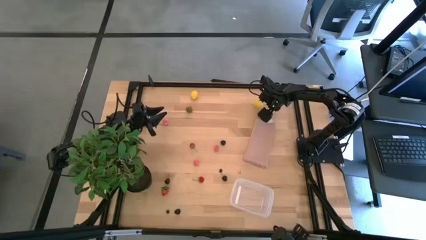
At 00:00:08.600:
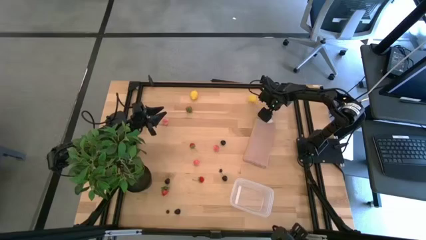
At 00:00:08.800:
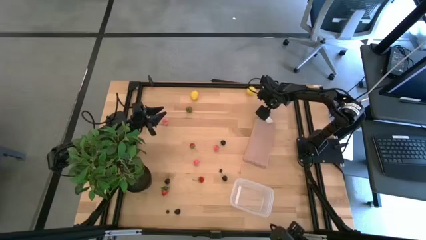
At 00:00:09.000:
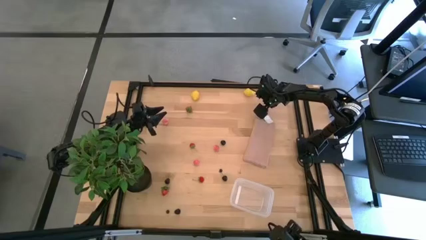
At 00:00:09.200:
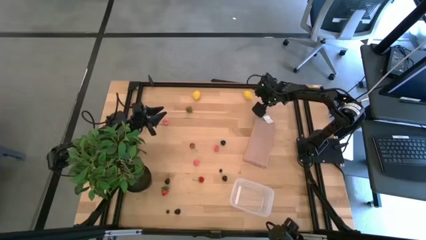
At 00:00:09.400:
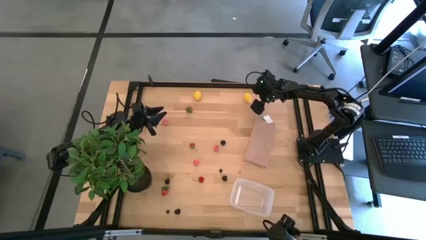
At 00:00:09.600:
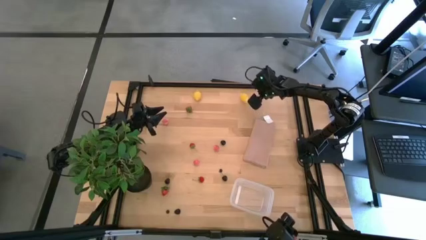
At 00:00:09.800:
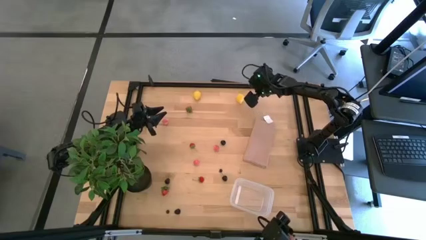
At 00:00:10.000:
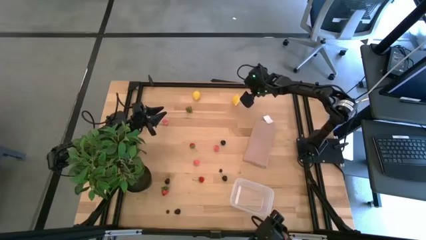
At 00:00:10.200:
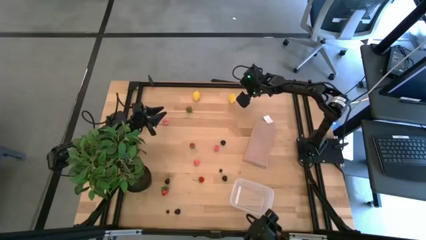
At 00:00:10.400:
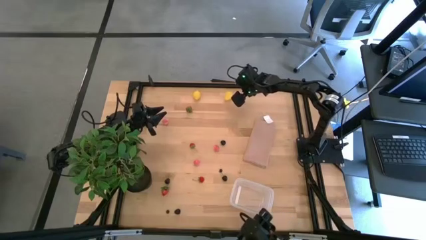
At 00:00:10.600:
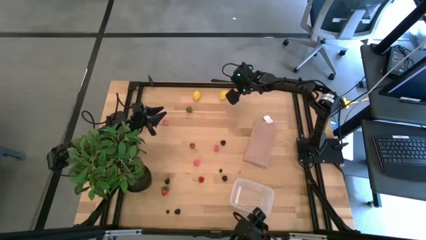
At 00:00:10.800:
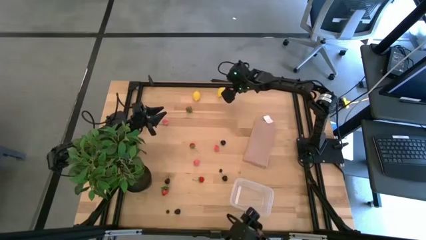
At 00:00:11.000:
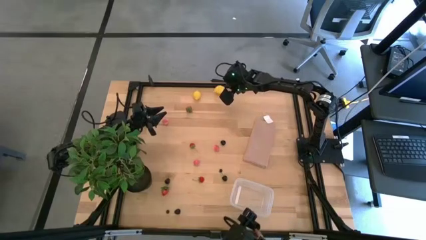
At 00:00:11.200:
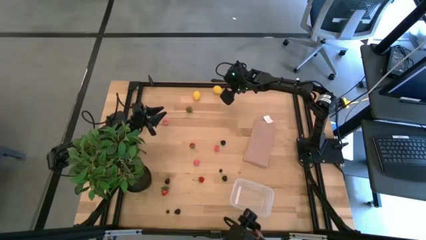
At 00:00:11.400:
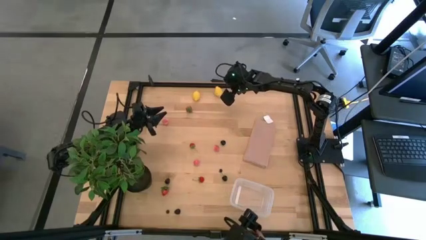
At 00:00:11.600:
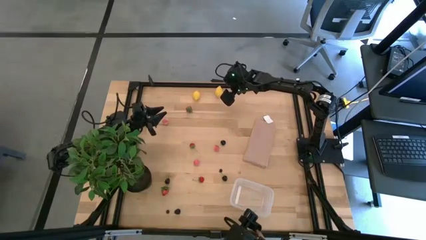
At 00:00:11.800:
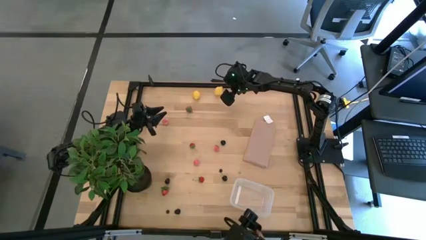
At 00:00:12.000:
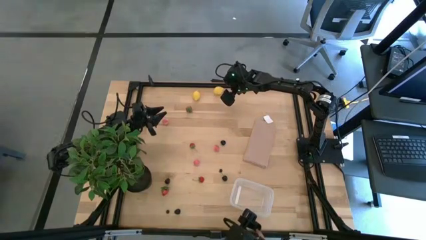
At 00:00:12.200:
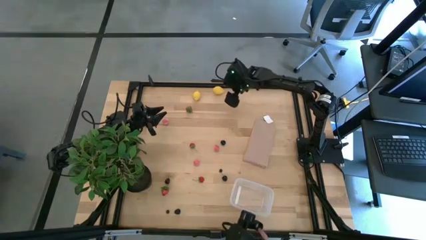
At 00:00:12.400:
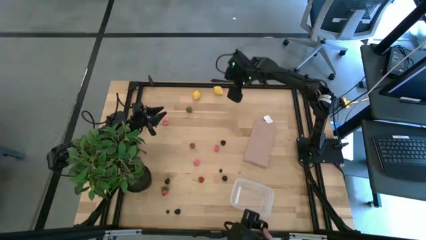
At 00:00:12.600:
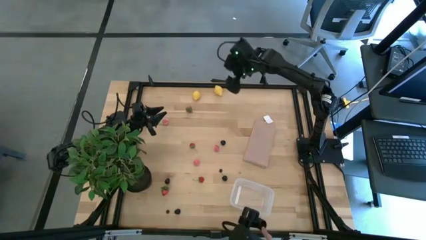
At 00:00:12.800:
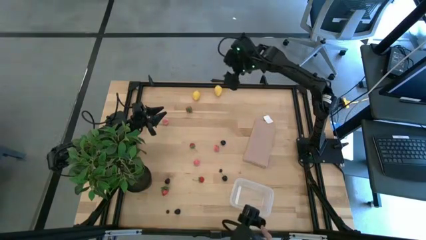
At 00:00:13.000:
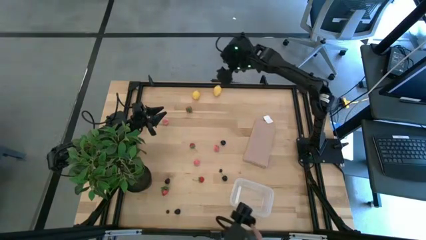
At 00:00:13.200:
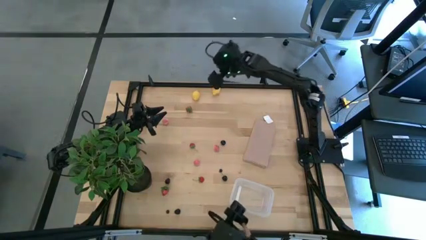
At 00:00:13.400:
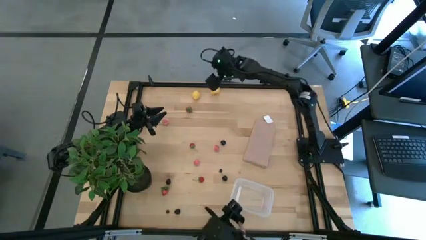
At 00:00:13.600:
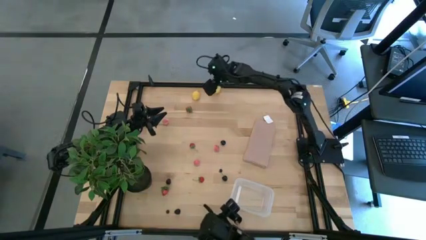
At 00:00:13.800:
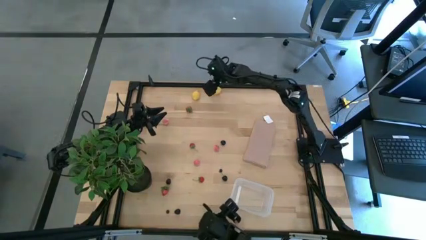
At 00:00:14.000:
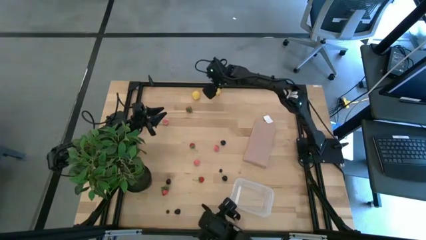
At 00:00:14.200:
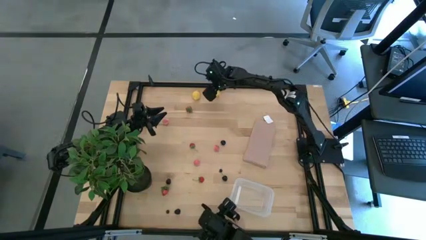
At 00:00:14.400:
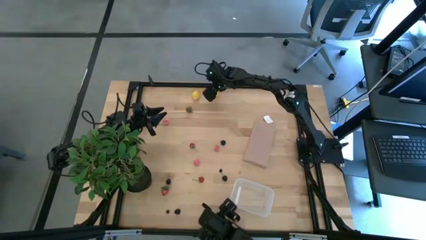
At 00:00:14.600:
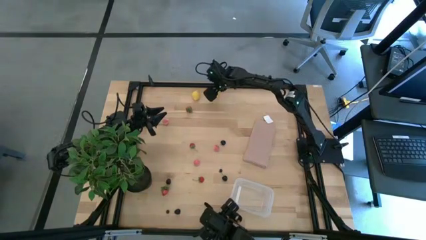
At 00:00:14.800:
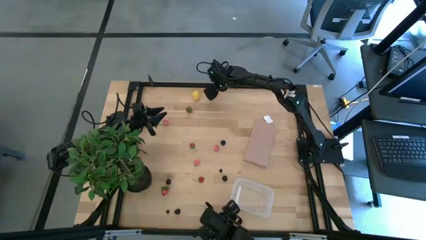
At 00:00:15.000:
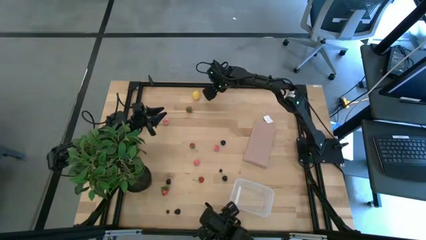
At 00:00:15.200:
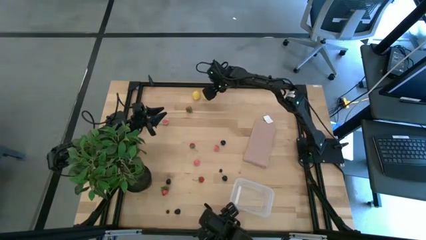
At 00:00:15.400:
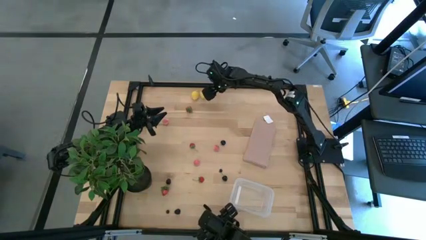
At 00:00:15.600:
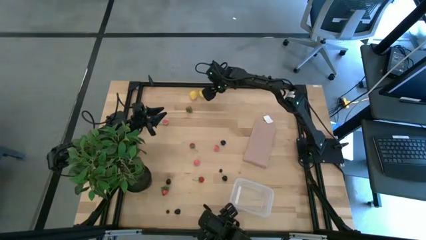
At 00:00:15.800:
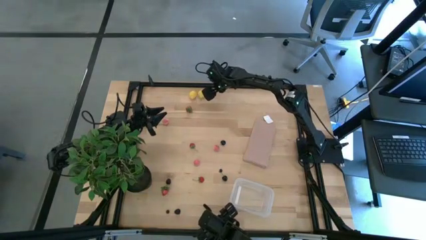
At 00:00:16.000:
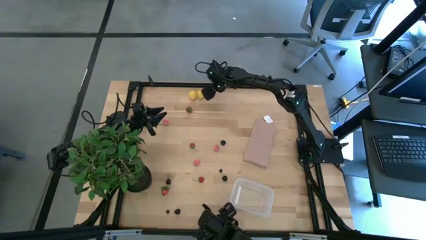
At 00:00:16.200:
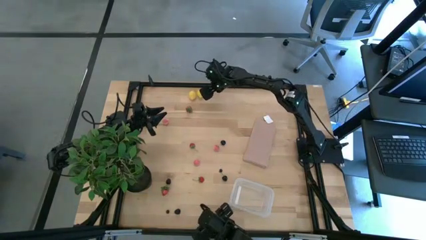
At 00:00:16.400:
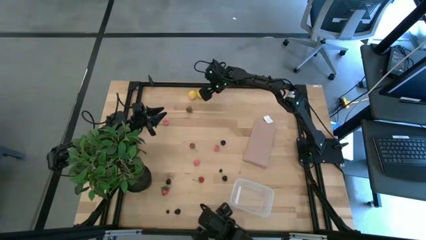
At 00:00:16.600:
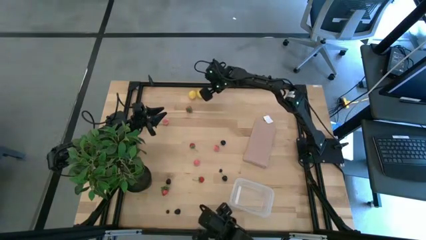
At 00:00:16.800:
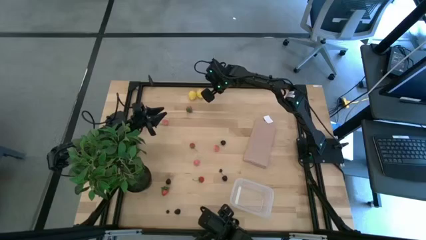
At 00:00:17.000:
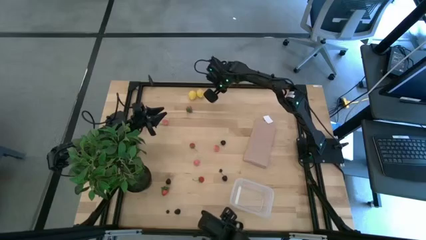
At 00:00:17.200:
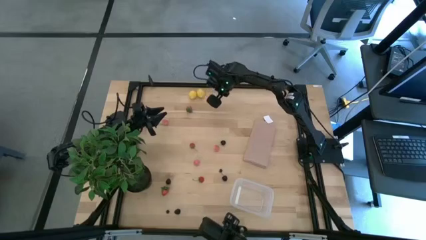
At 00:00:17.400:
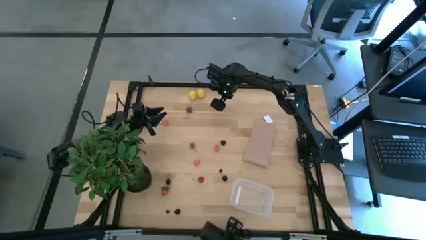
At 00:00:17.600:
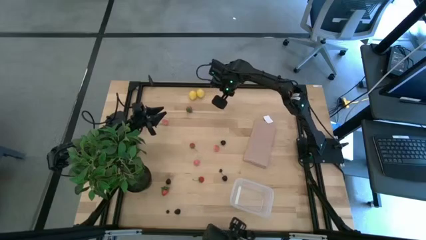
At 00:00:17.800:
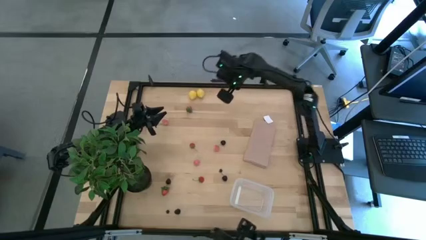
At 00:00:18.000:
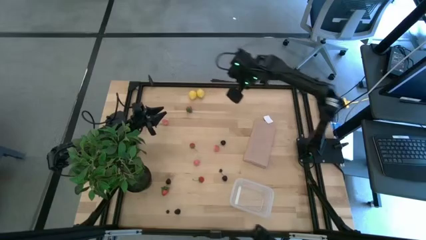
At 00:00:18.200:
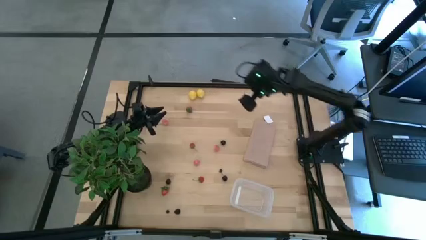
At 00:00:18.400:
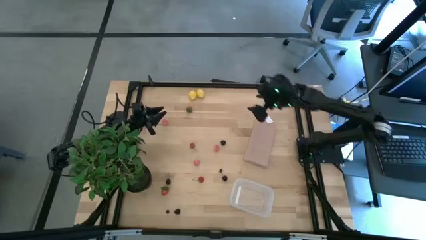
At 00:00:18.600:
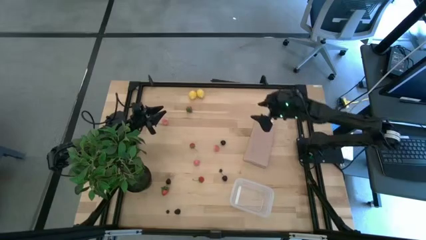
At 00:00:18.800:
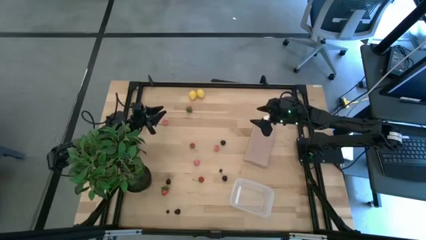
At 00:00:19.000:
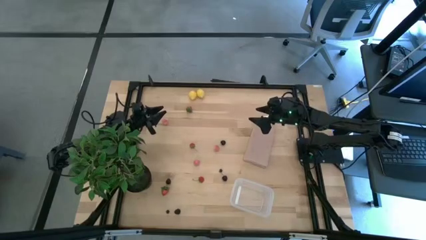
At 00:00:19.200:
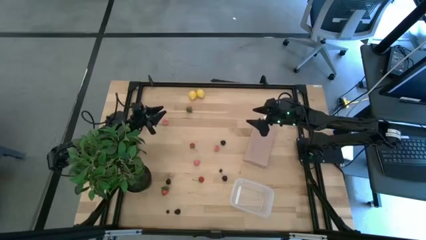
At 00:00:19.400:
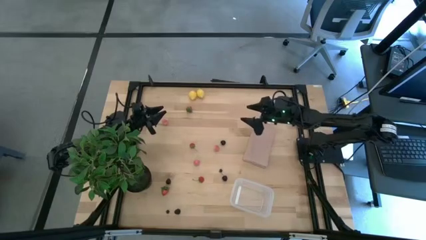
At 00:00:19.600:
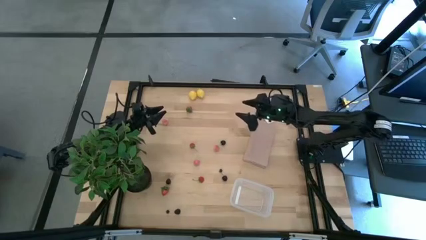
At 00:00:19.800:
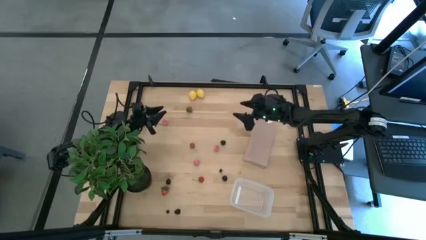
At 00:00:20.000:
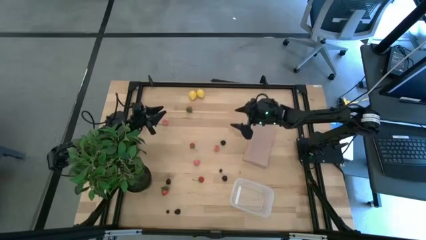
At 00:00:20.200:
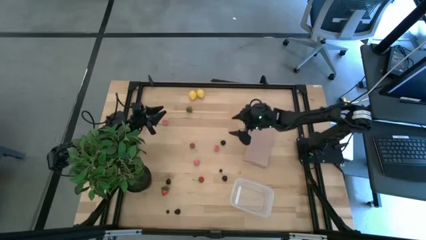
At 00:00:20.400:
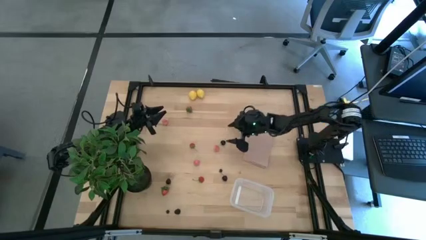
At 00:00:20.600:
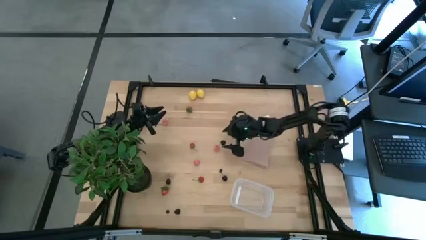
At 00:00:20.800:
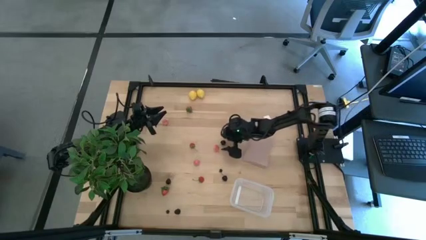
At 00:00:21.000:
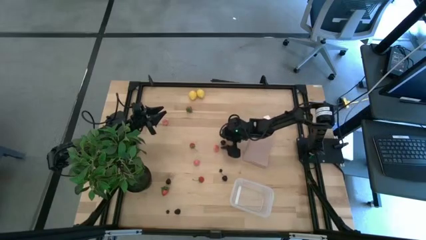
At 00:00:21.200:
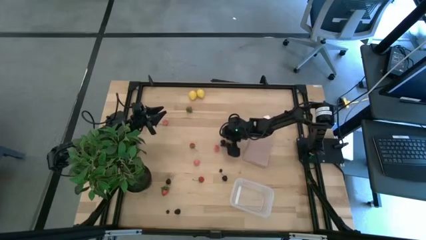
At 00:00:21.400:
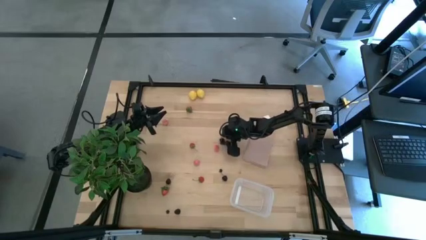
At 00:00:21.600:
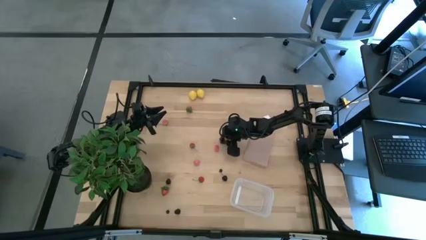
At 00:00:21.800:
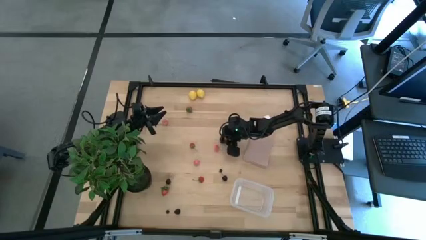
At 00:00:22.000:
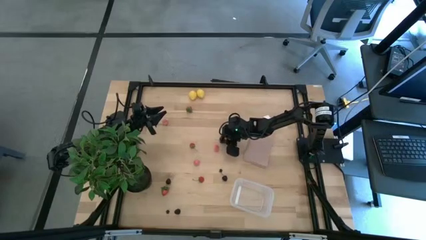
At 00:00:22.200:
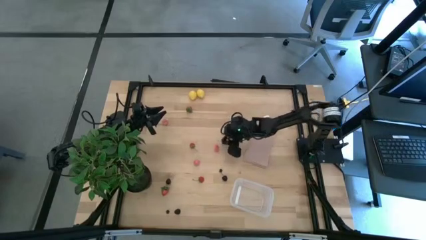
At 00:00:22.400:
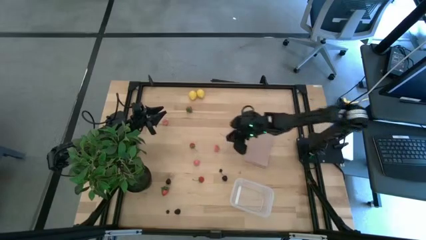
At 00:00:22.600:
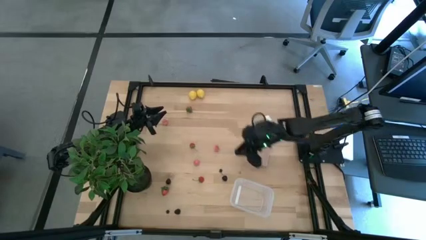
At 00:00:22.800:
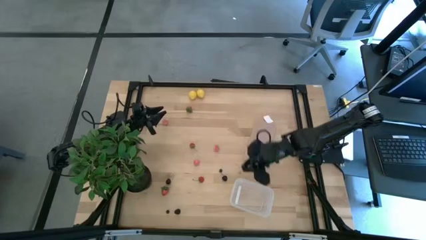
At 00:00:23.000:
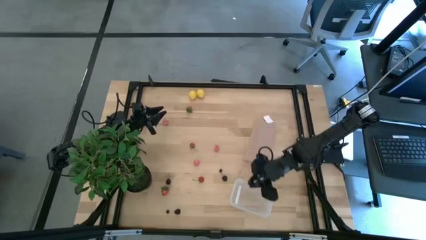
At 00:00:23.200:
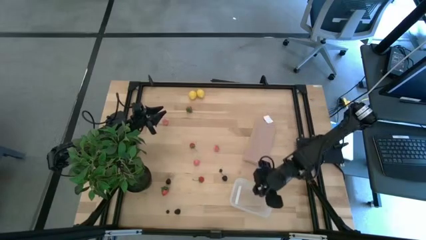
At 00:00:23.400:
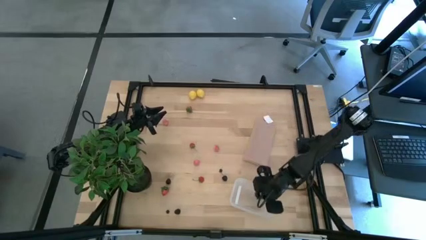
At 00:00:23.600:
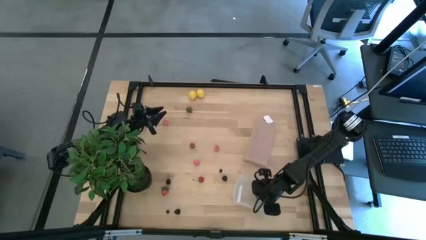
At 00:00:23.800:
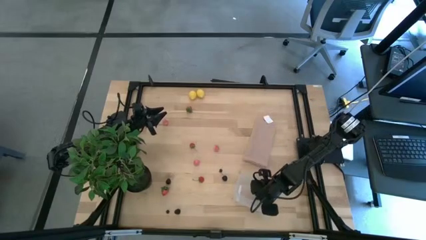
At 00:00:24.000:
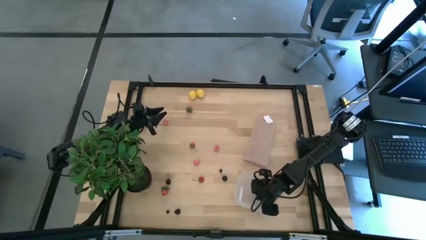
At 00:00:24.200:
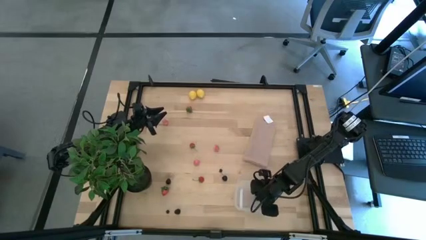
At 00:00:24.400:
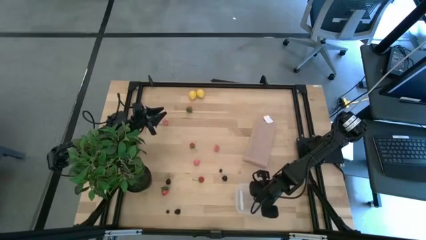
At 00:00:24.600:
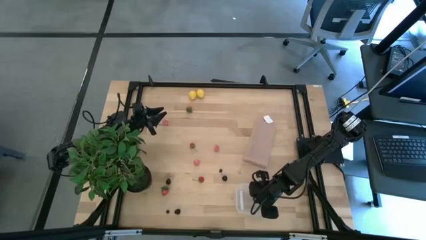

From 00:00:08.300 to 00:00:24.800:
Task: Pick and placing Produce into tupperware
Put the cherry into the transparent container
